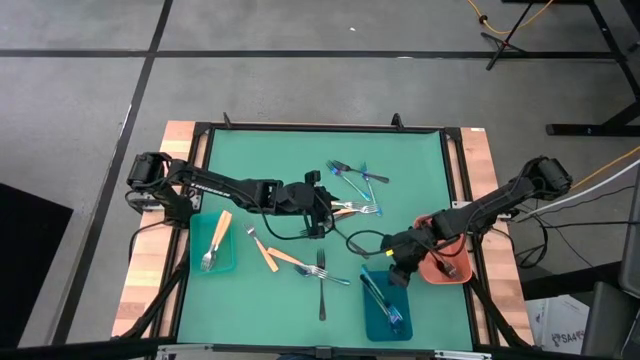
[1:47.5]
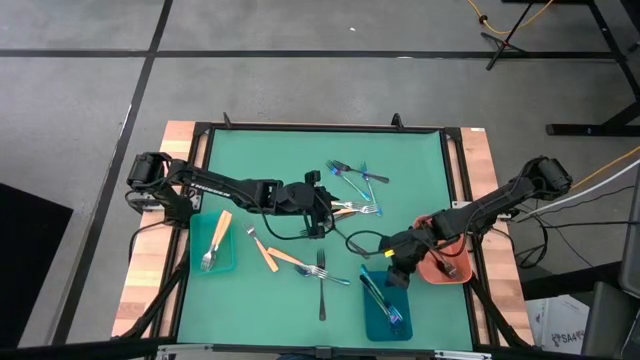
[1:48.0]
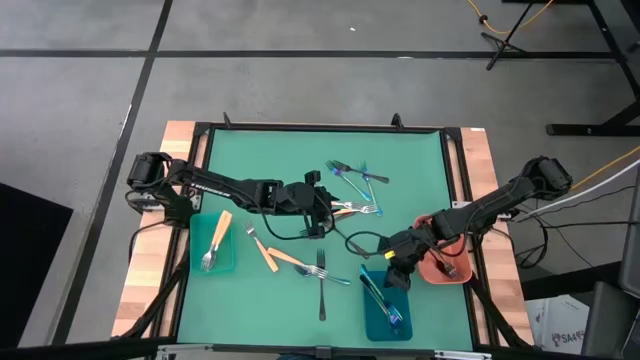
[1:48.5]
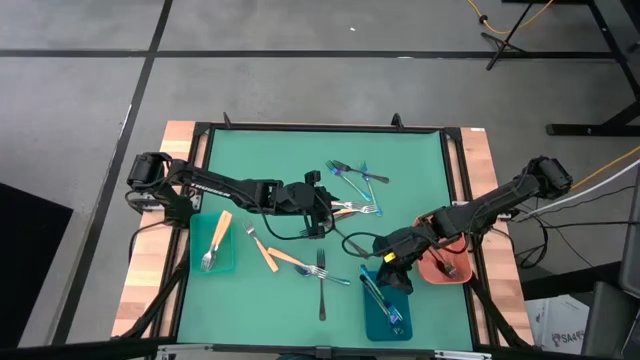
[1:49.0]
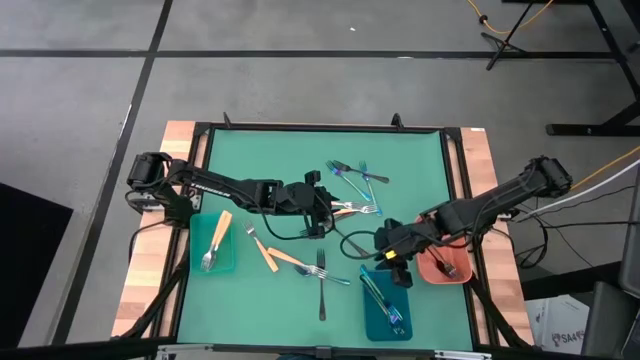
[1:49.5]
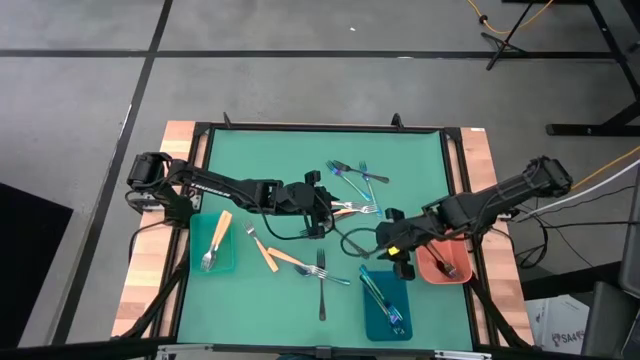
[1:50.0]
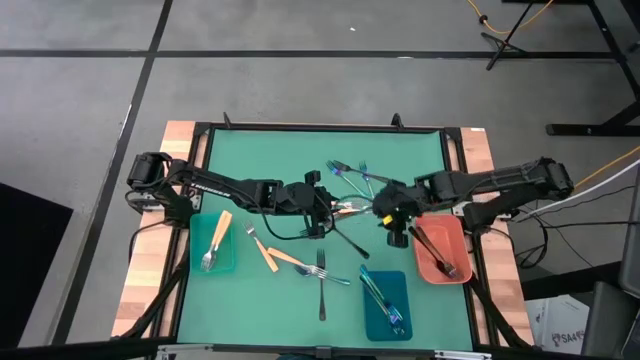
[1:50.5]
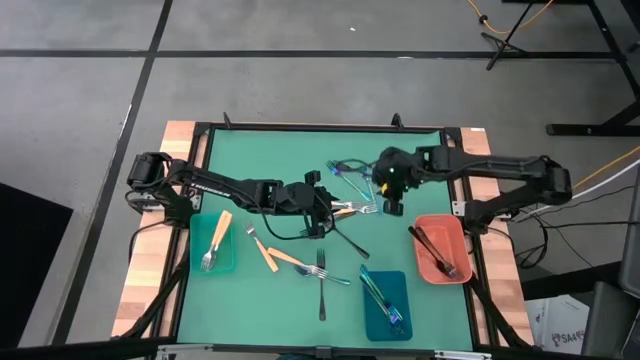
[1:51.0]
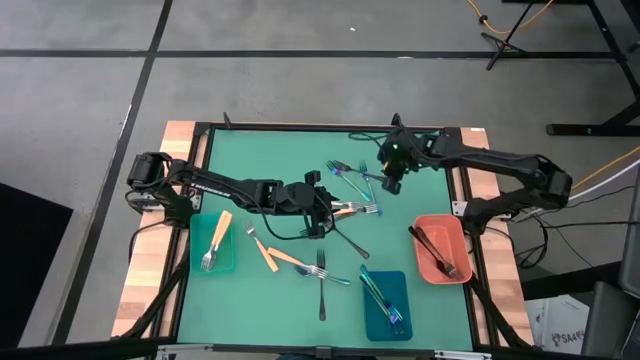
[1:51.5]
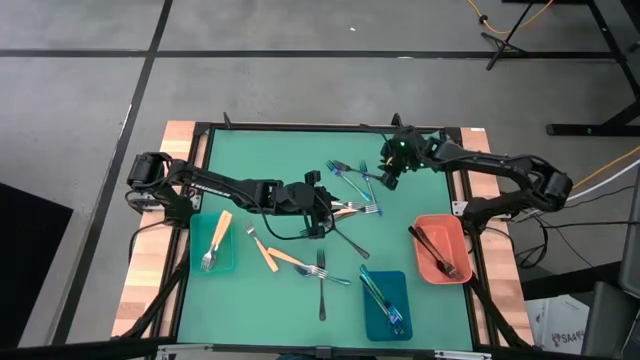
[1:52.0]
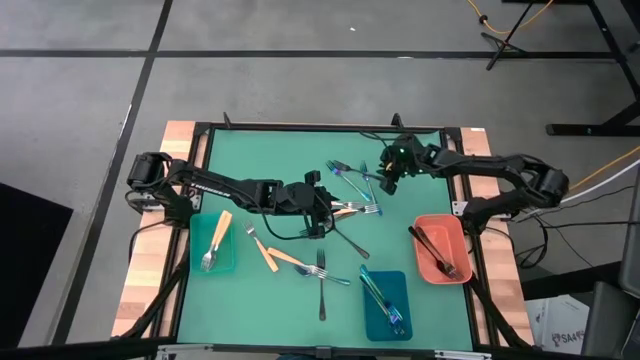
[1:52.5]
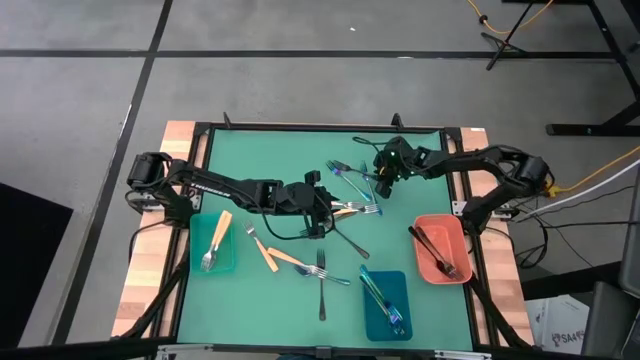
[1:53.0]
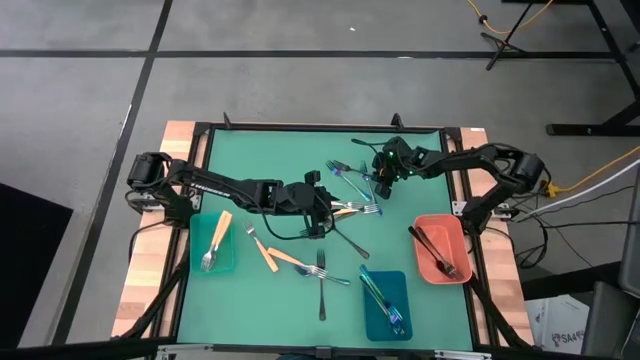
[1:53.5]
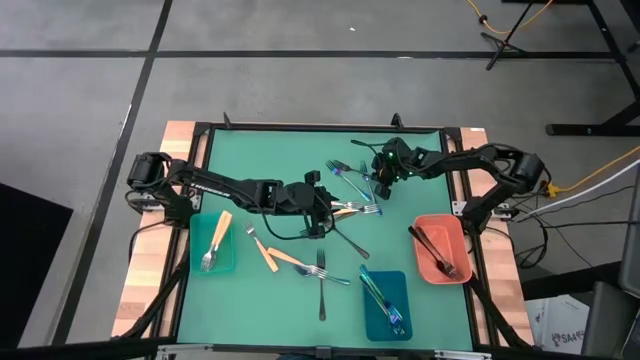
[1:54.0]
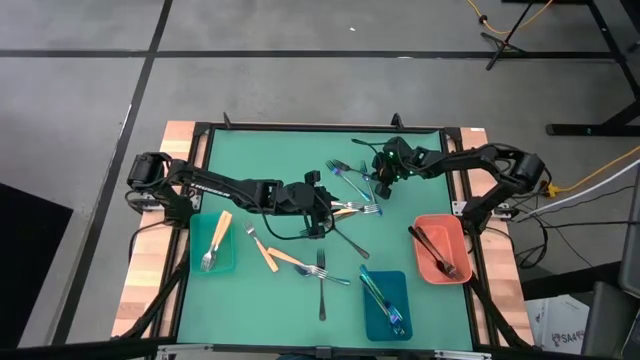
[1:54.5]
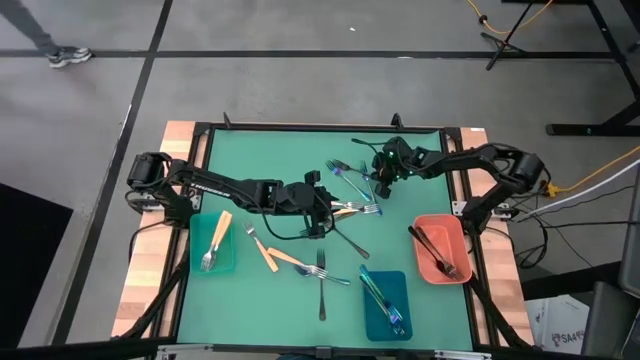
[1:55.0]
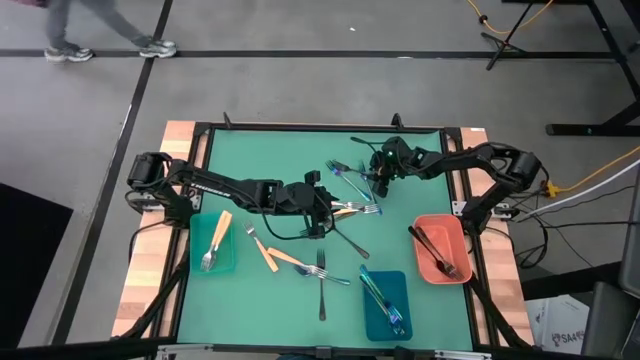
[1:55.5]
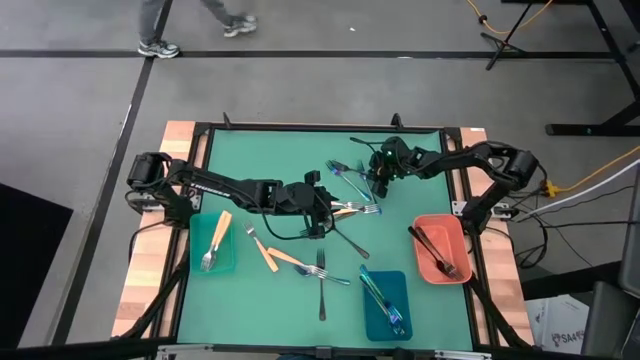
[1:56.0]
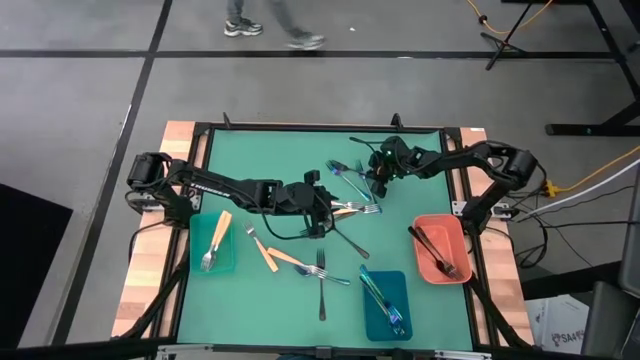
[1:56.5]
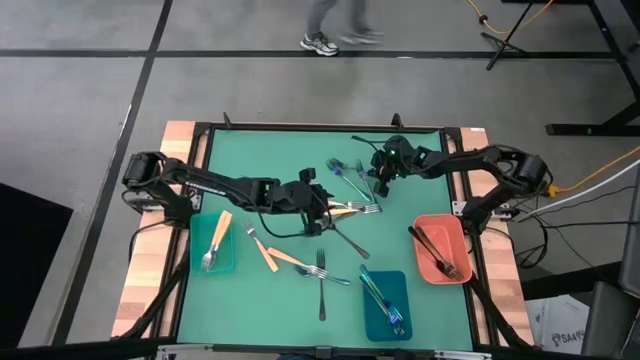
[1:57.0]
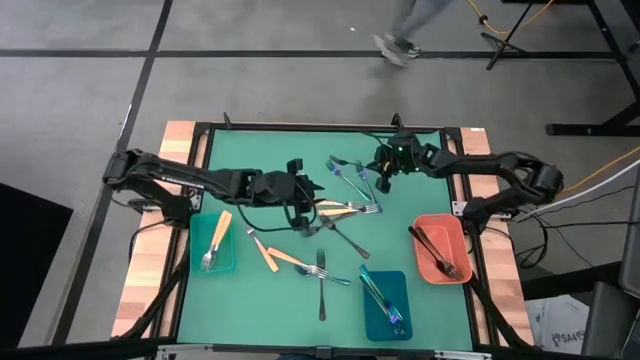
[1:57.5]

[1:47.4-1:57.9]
Task: Sort silverware by color (type)
Put the black fork into the orange bin

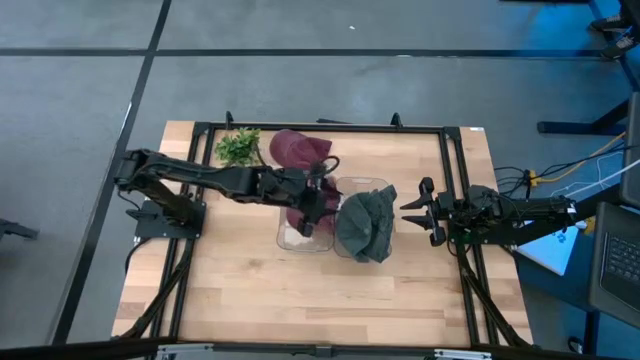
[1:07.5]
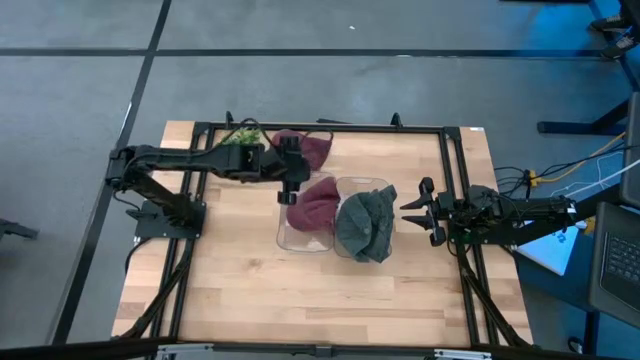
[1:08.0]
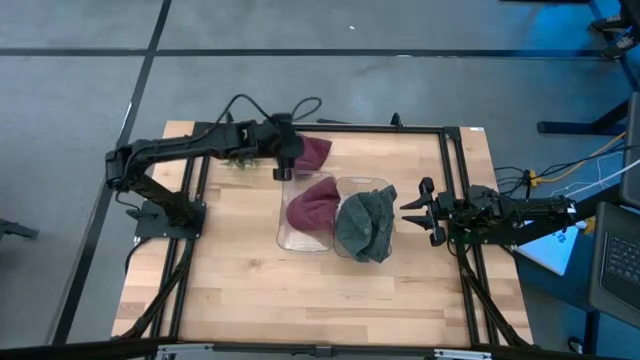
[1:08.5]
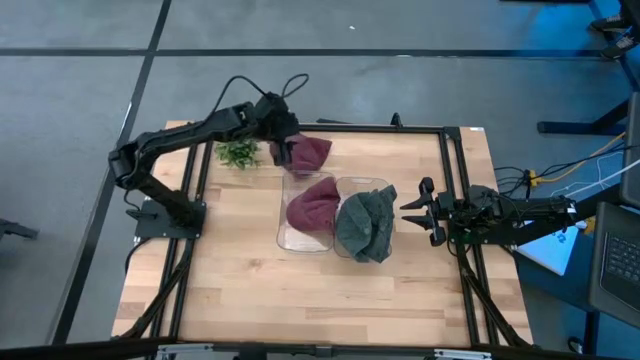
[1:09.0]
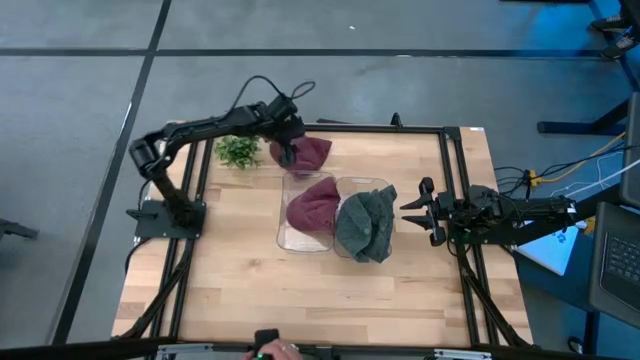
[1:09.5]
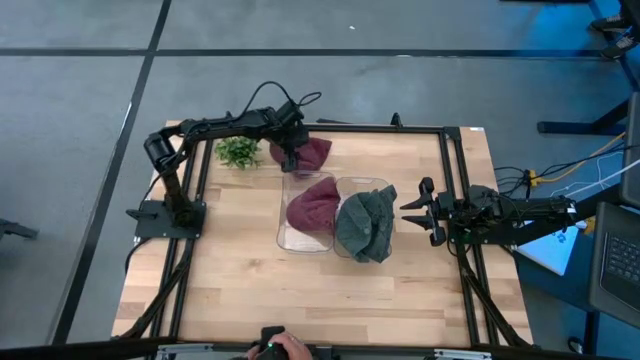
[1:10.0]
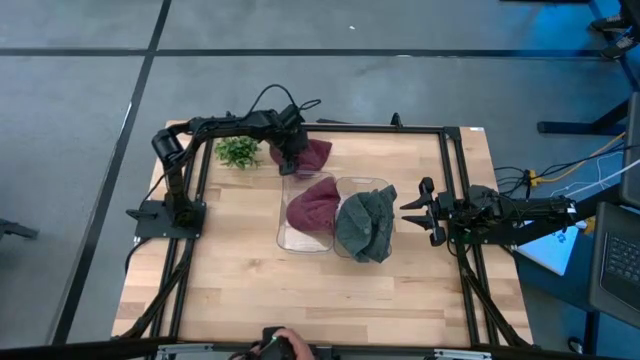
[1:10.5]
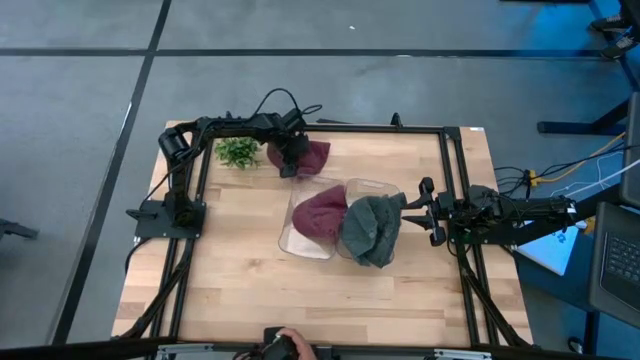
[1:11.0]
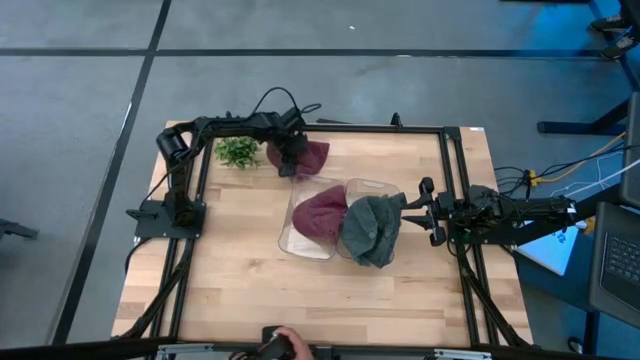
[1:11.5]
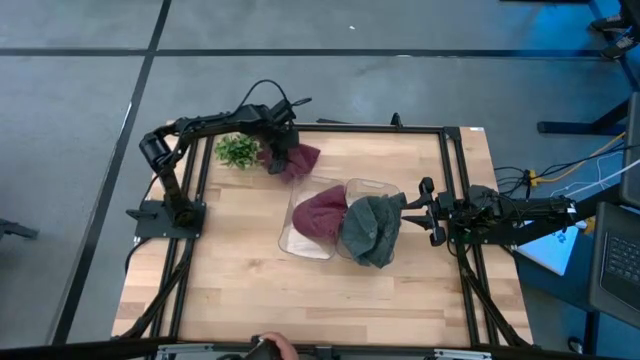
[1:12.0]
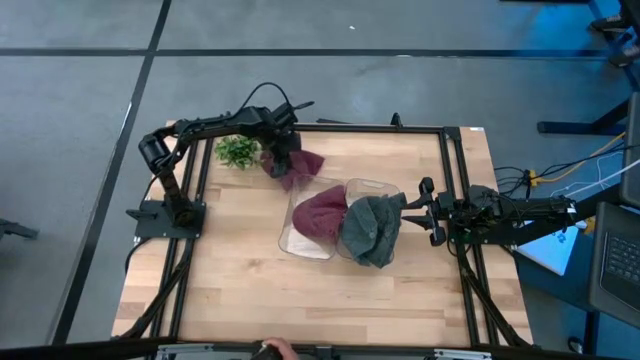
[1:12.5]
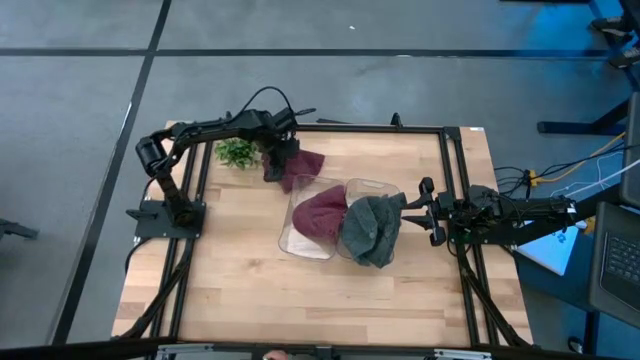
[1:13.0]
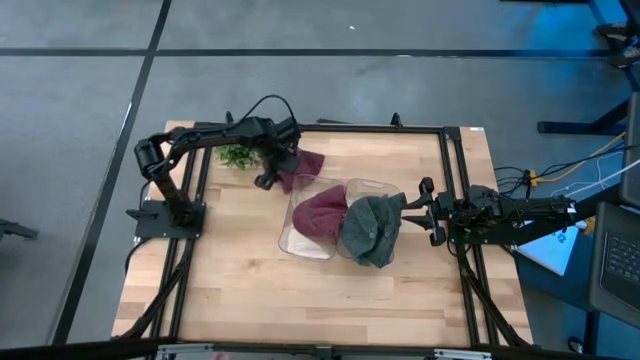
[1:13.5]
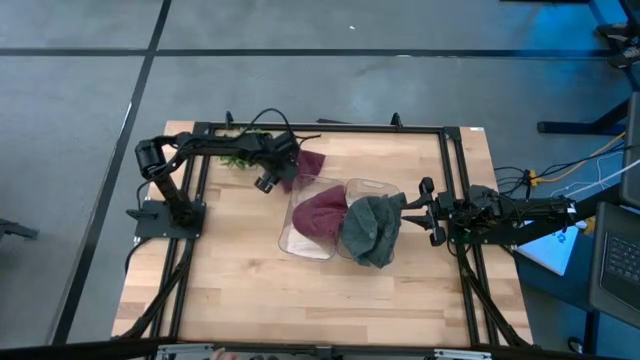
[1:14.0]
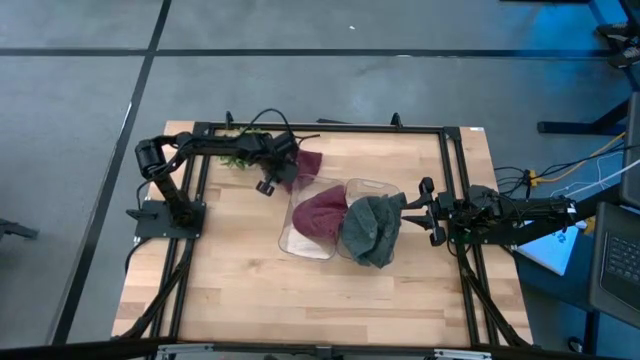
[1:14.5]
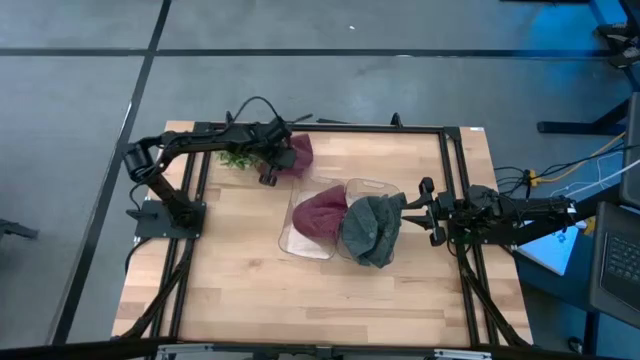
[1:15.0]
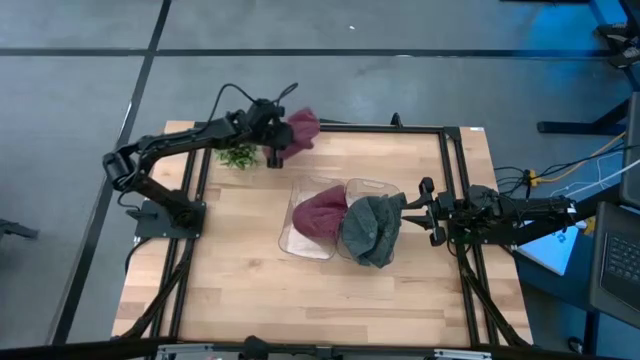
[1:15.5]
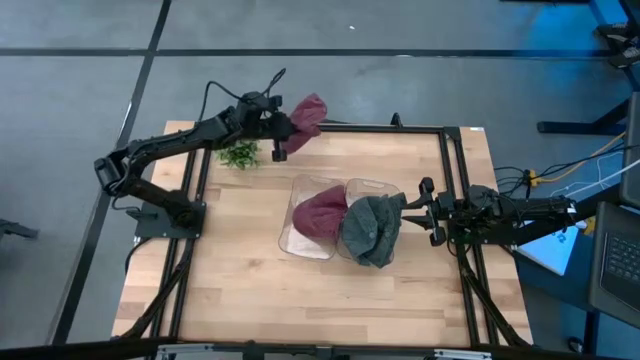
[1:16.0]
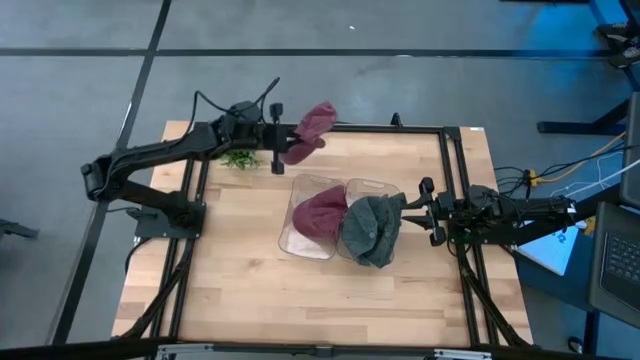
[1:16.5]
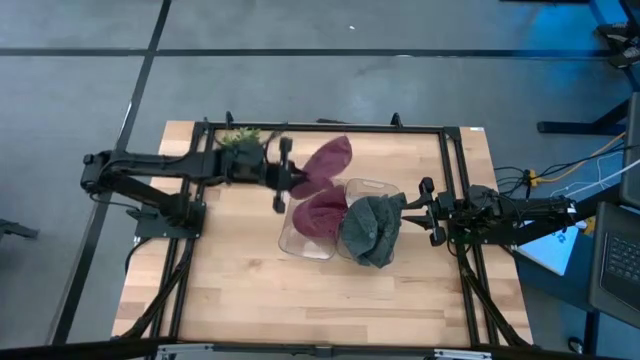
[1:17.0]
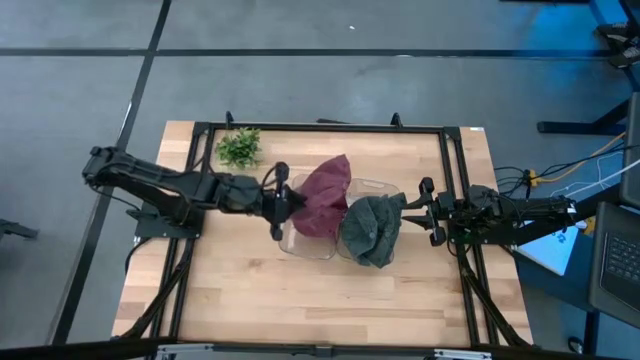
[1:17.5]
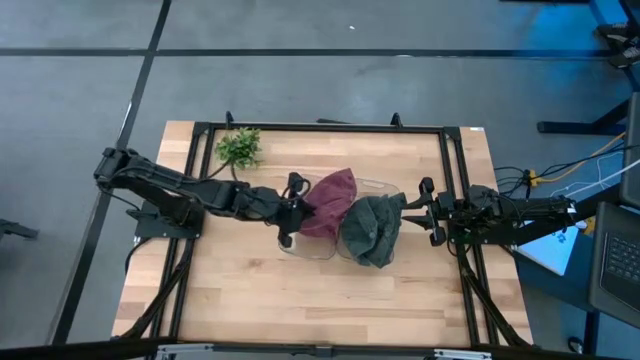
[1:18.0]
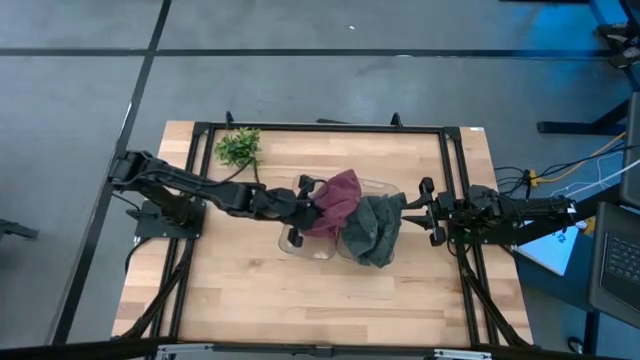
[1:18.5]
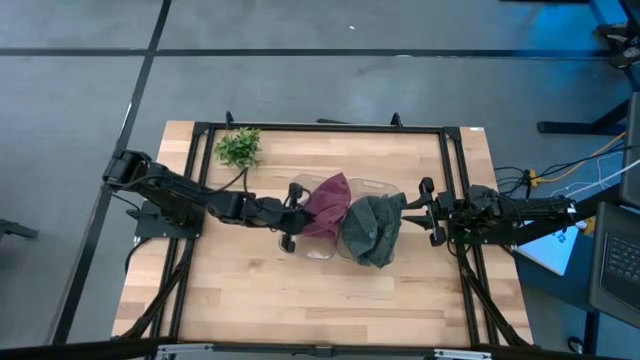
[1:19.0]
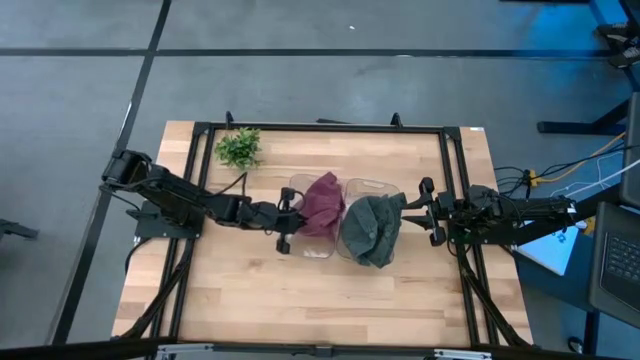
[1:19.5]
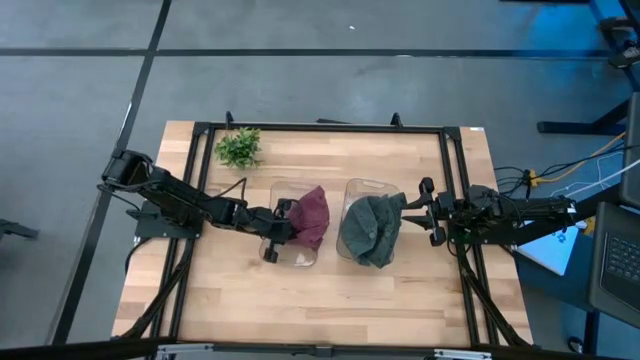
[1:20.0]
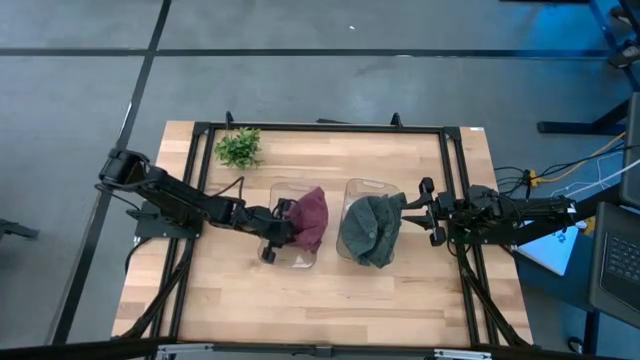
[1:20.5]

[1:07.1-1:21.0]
Task: Pick & Place hat
Put the red cap into the left transparent bin
